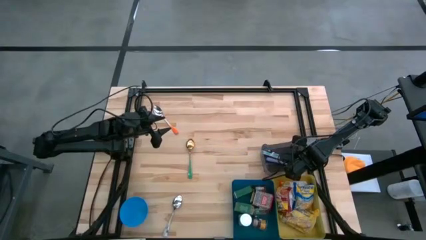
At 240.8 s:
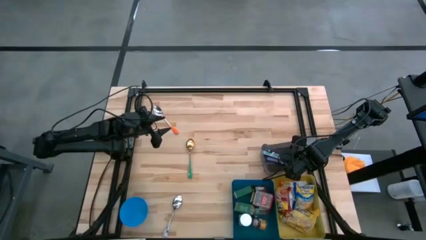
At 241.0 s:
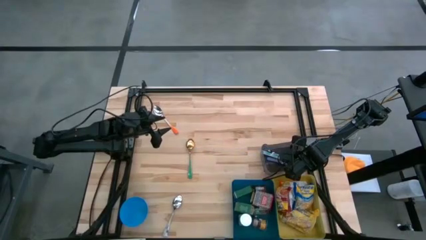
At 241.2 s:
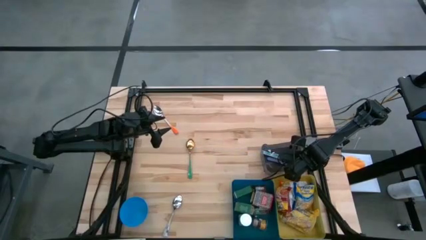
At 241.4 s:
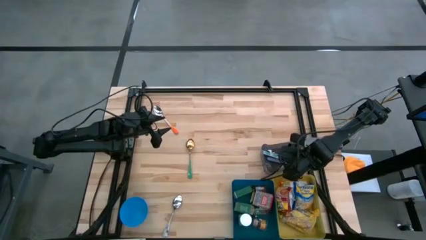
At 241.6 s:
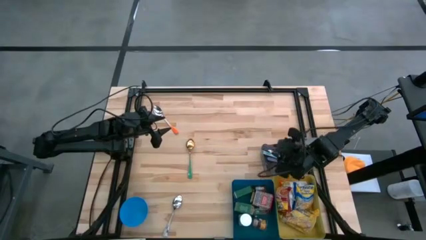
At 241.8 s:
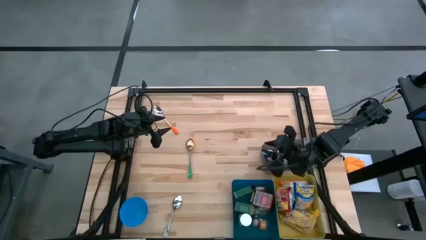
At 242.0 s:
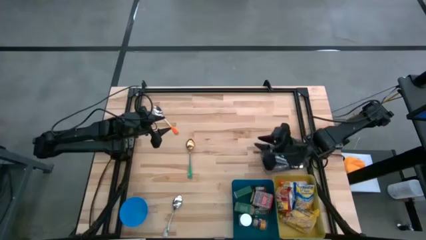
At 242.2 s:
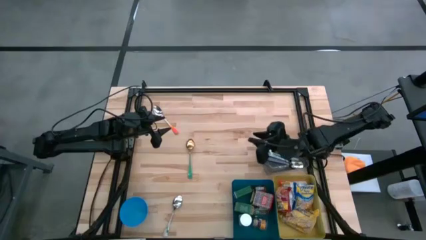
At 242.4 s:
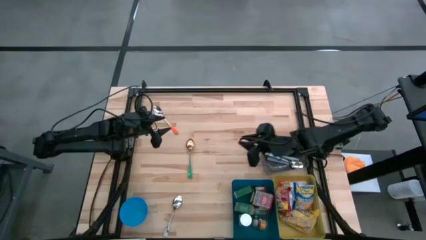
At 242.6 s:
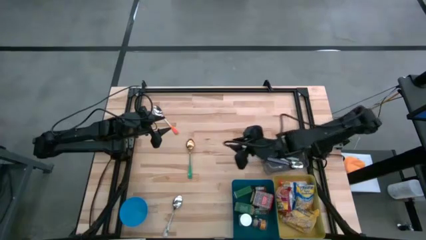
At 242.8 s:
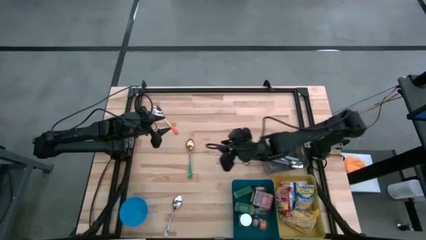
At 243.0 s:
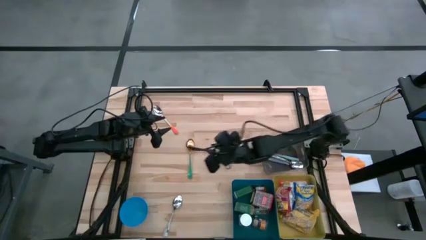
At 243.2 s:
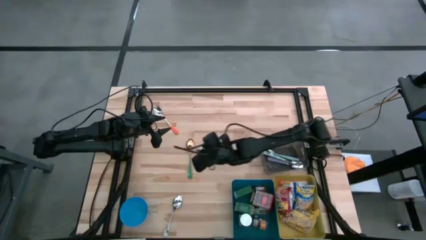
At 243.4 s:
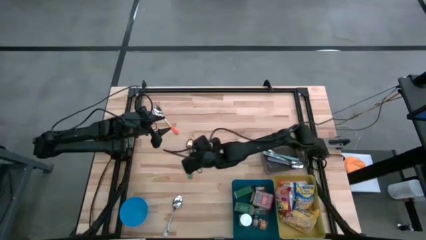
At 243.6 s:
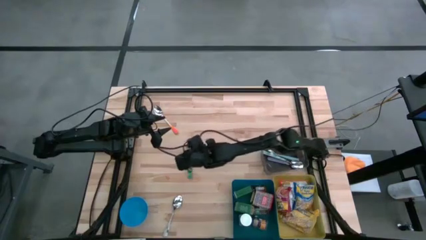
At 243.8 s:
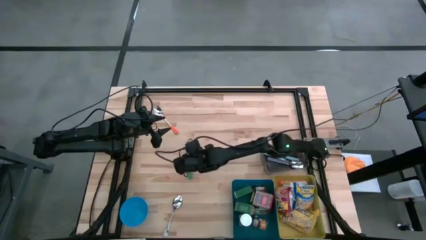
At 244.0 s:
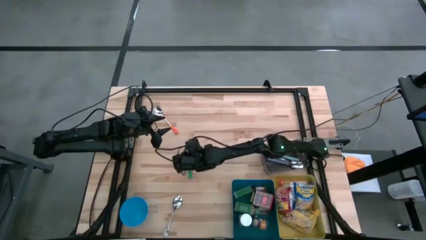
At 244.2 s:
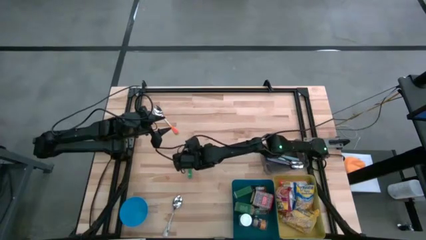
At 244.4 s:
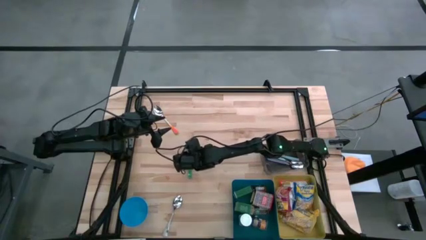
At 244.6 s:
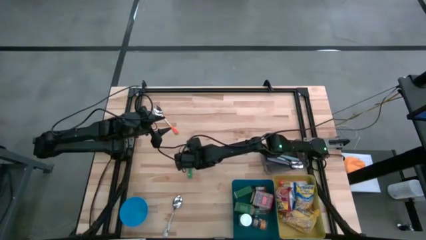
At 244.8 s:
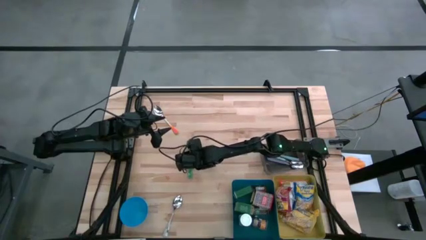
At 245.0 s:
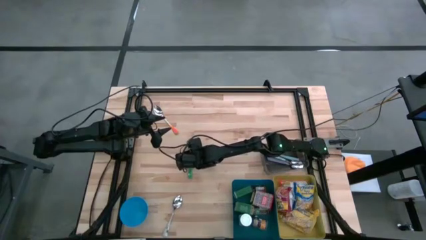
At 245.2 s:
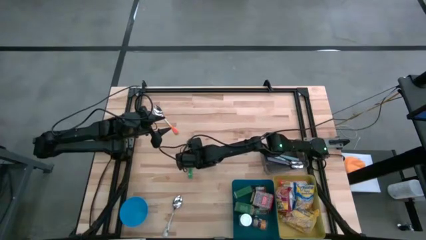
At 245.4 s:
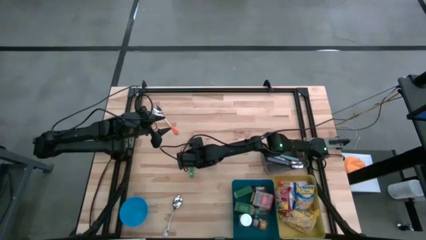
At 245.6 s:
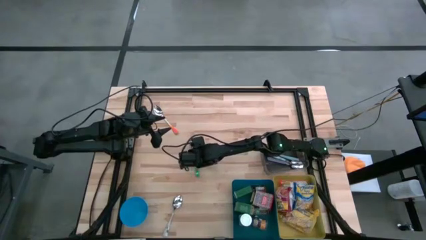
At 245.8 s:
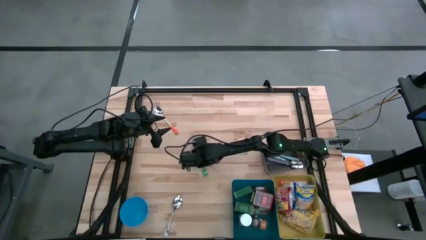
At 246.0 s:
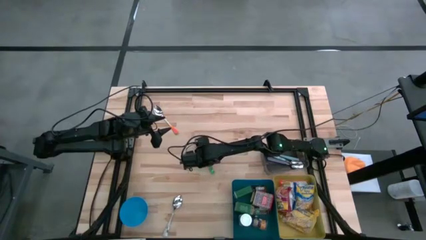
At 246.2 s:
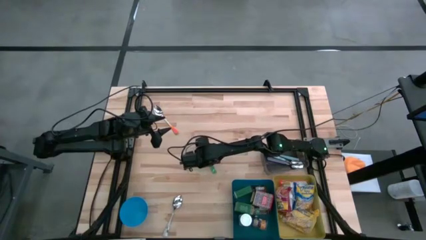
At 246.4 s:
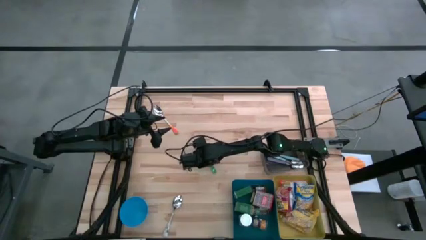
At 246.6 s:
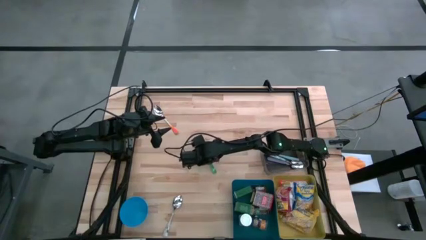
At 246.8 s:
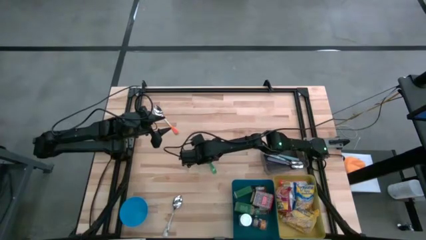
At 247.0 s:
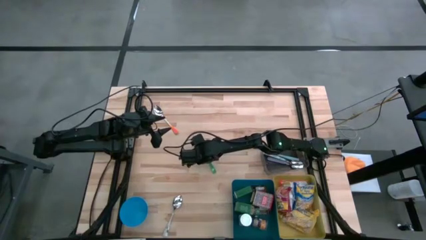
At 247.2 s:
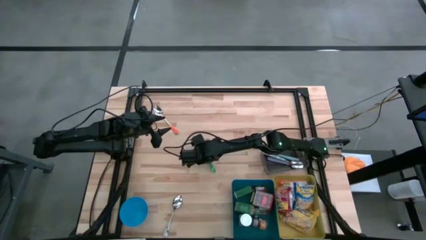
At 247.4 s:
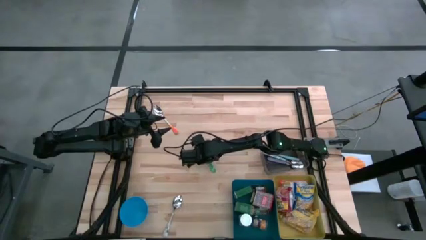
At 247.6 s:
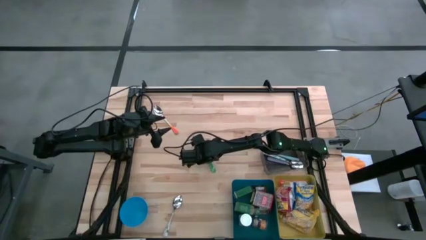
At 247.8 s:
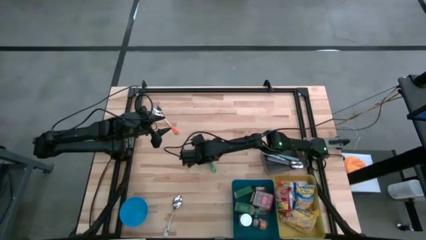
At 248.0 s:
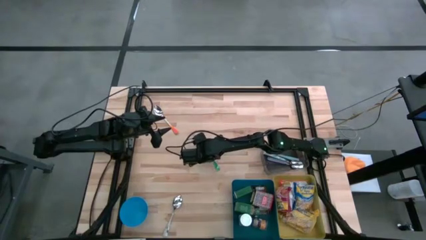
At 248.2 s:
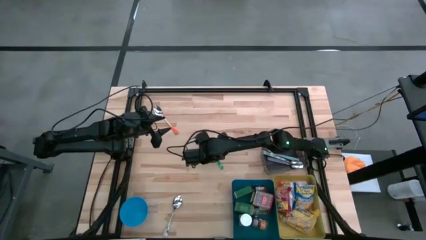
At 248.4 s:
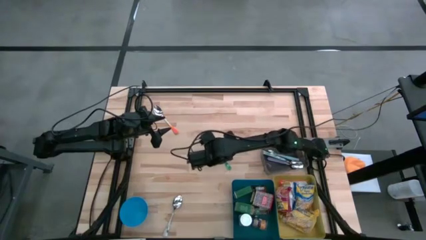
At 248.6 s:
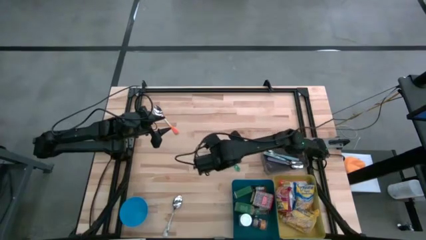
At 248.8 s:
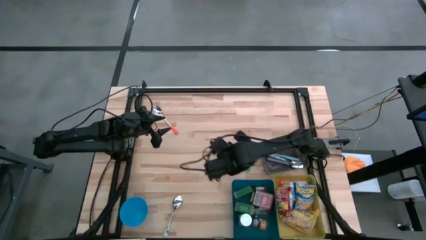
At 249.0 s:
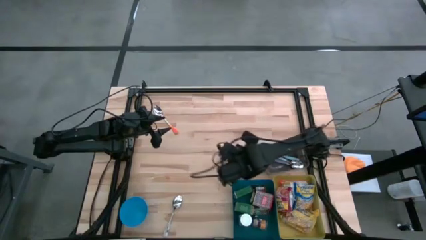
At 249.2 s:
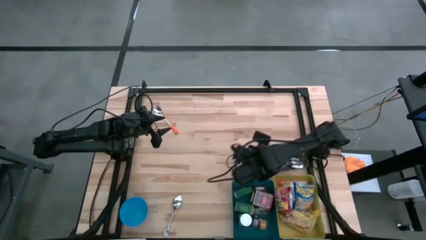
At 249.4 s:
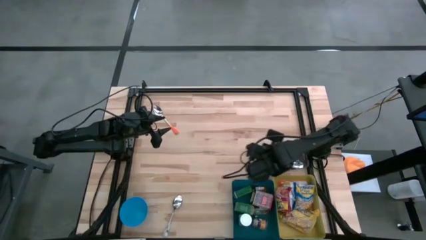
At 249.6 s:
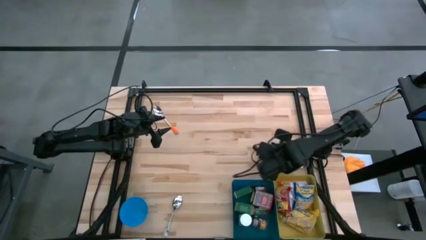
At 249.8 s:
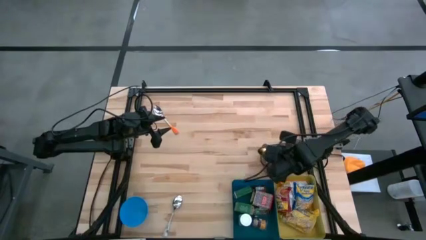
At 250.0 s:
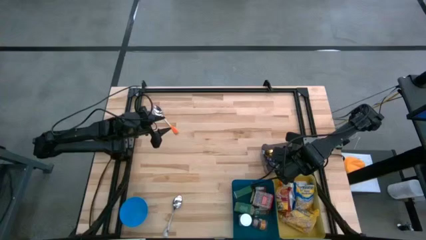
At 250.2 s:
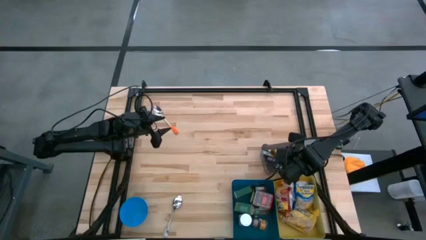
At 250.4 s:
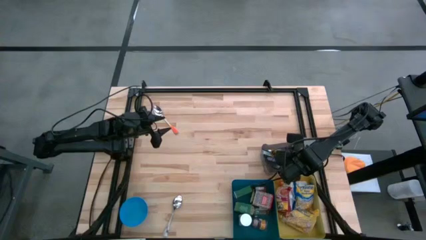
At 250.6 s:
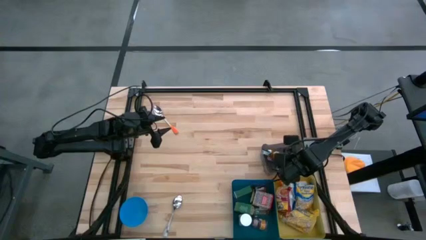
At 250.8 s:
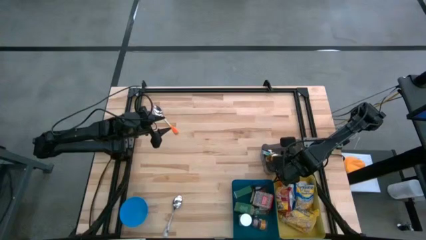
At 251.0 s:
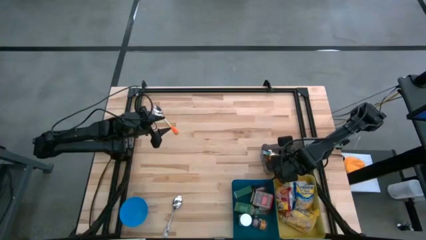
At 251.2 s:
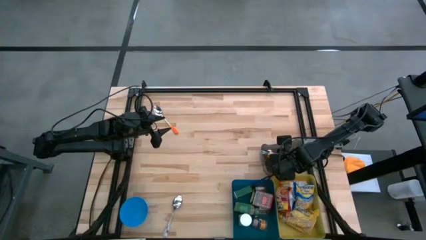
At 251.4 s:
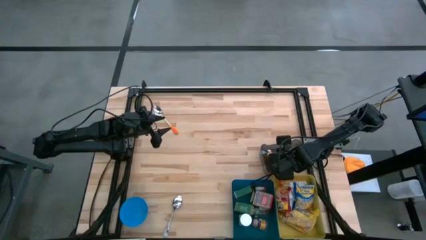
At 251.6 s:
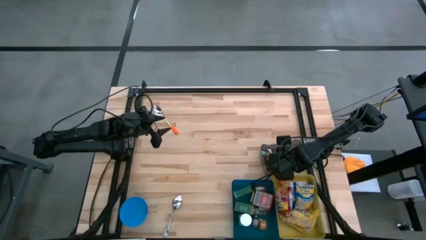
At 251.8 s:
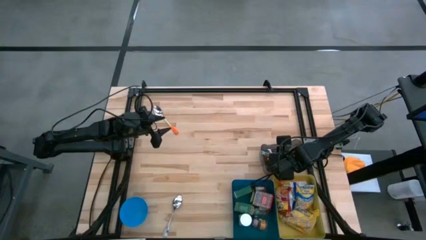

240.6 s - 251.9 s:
Put the green spoon into the black bin
